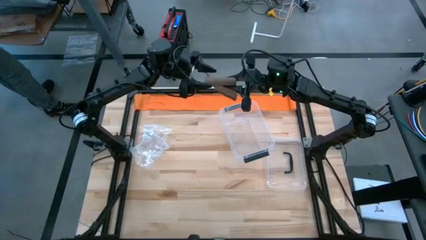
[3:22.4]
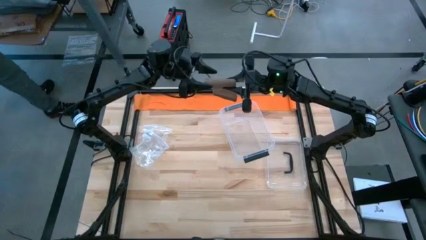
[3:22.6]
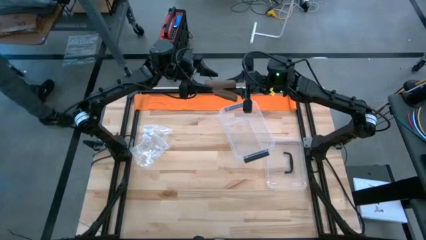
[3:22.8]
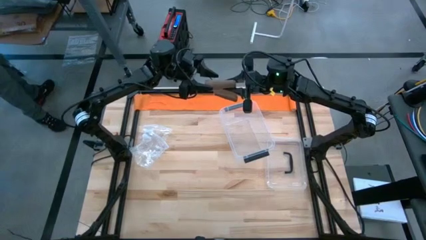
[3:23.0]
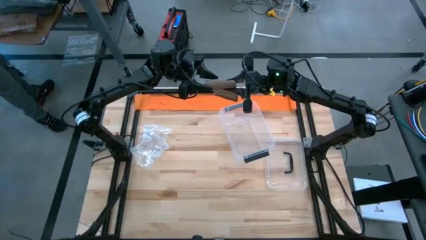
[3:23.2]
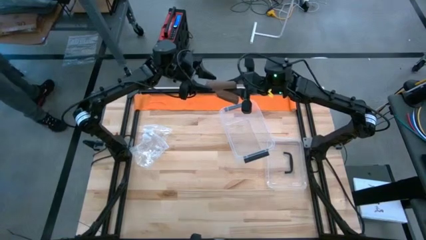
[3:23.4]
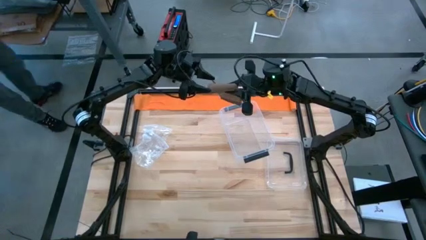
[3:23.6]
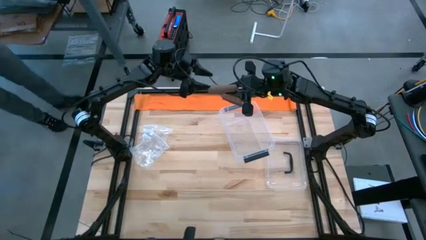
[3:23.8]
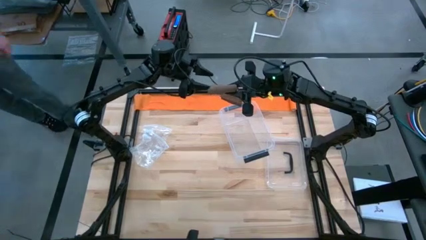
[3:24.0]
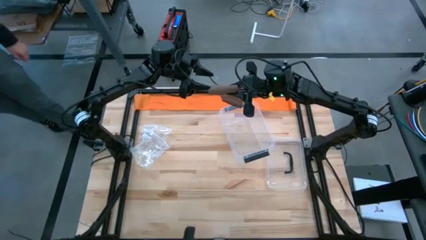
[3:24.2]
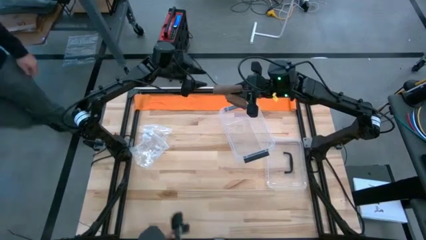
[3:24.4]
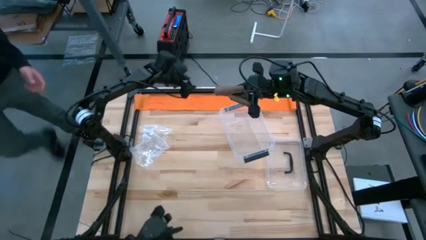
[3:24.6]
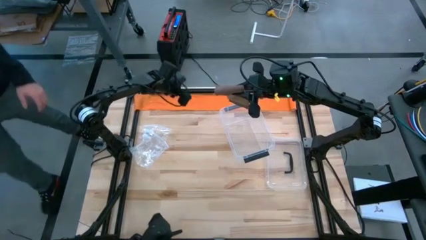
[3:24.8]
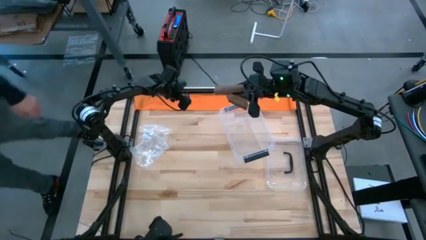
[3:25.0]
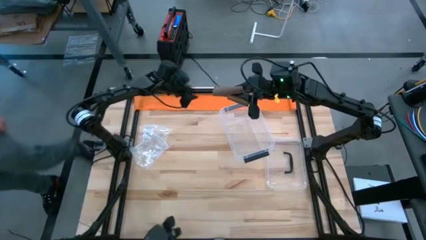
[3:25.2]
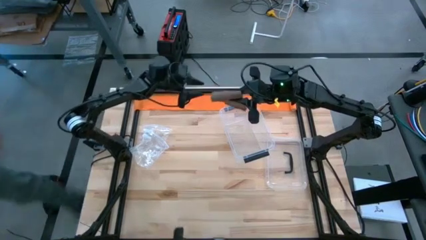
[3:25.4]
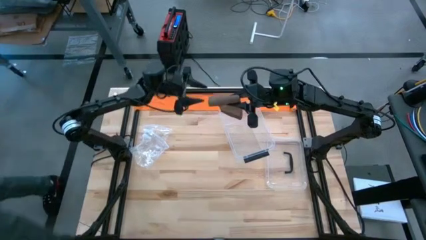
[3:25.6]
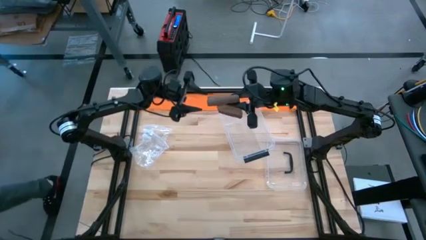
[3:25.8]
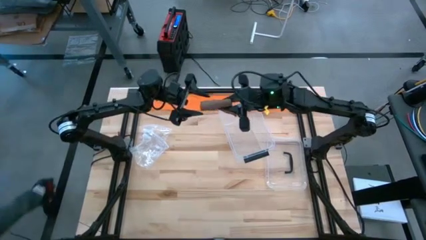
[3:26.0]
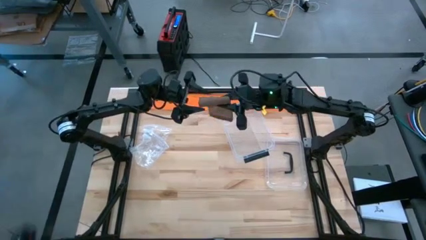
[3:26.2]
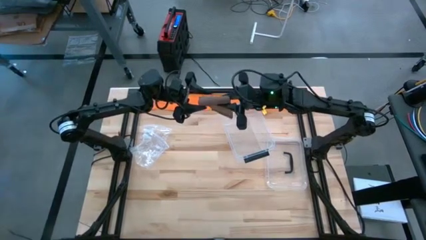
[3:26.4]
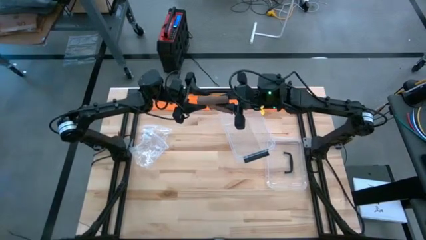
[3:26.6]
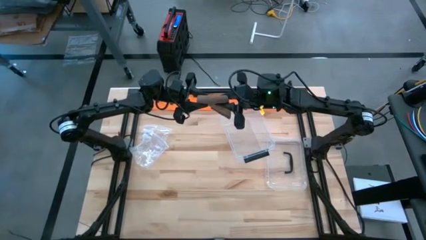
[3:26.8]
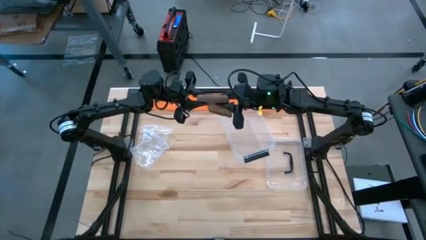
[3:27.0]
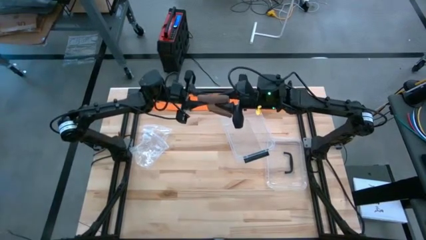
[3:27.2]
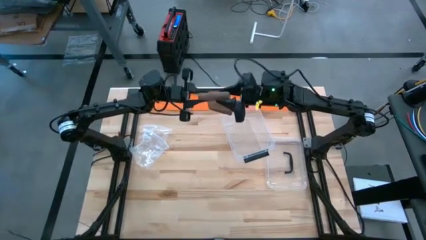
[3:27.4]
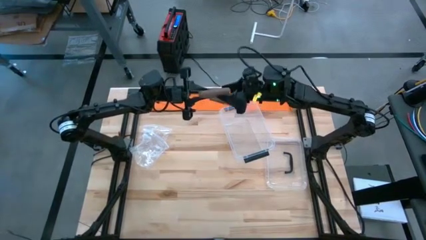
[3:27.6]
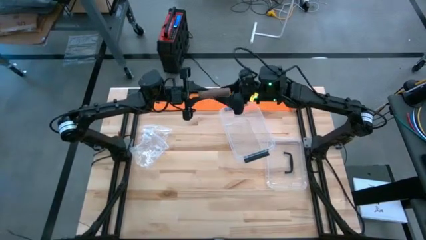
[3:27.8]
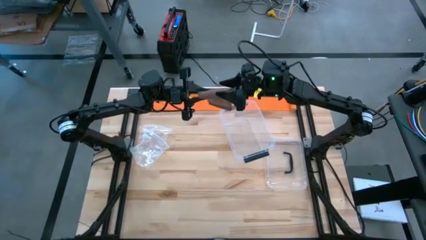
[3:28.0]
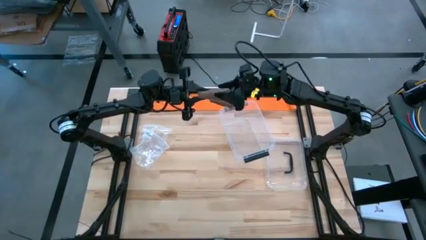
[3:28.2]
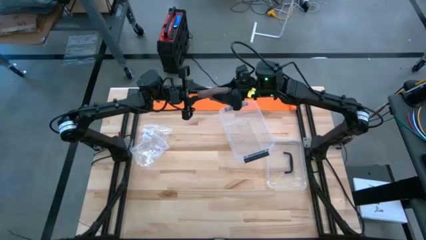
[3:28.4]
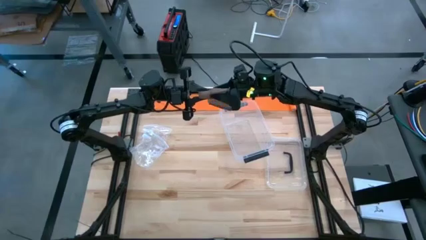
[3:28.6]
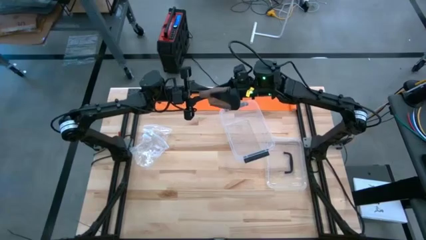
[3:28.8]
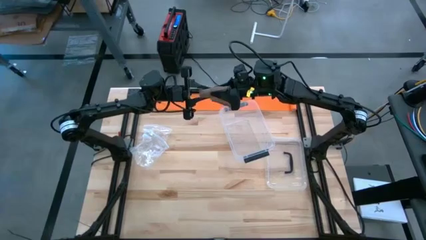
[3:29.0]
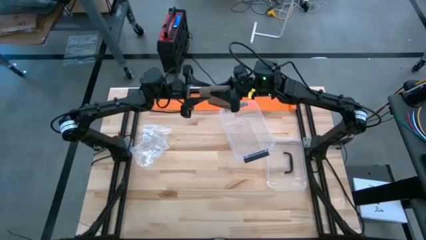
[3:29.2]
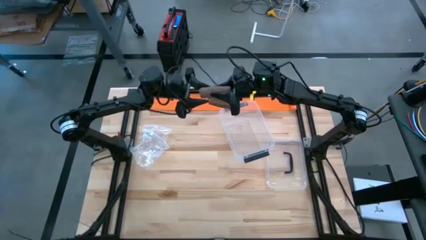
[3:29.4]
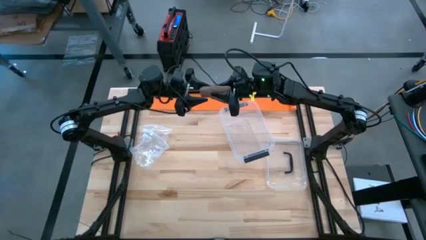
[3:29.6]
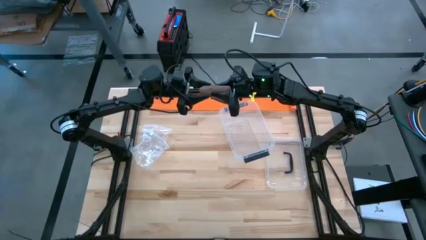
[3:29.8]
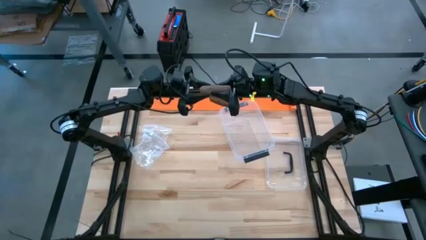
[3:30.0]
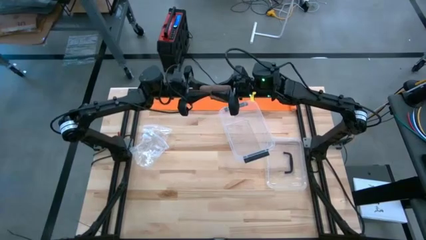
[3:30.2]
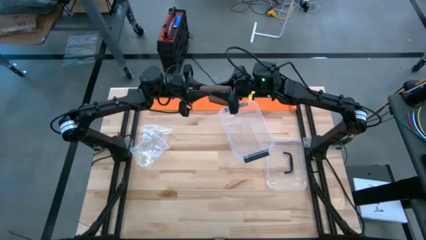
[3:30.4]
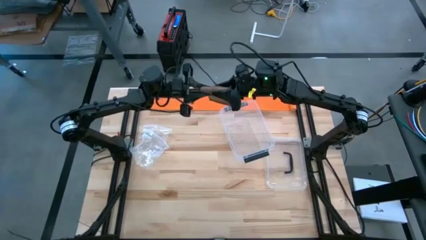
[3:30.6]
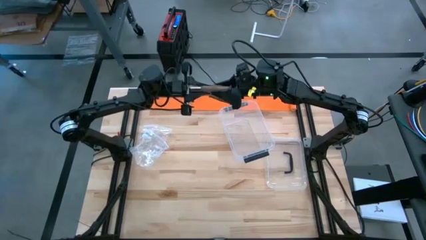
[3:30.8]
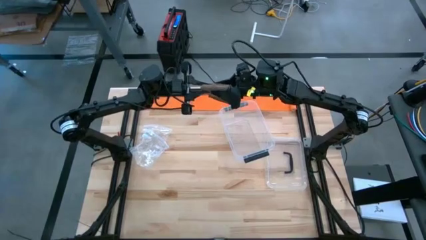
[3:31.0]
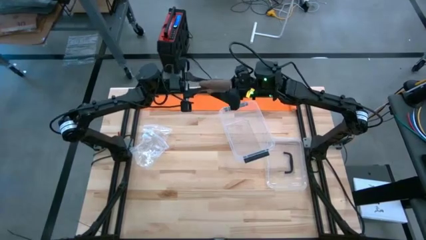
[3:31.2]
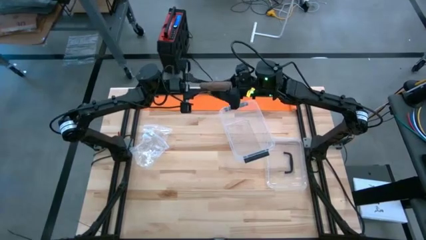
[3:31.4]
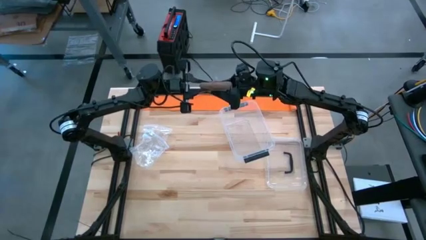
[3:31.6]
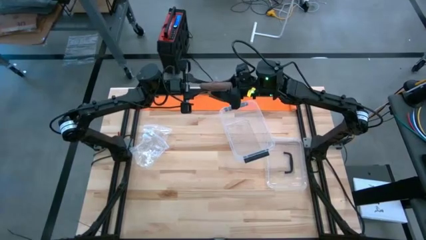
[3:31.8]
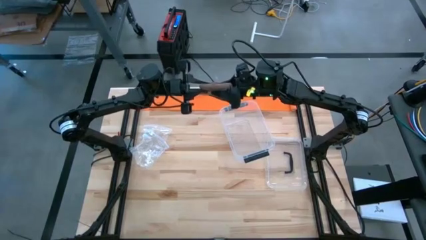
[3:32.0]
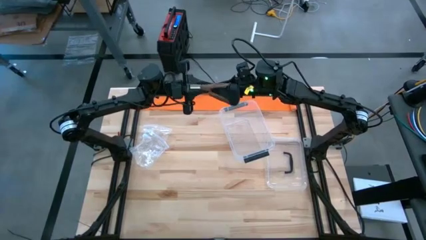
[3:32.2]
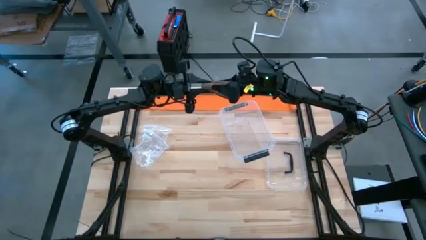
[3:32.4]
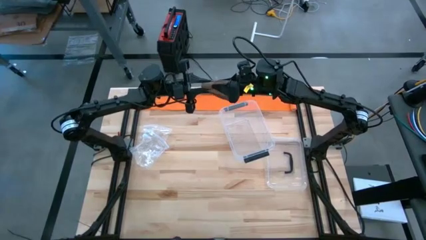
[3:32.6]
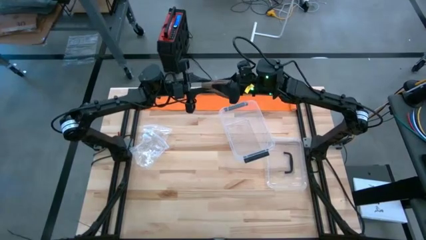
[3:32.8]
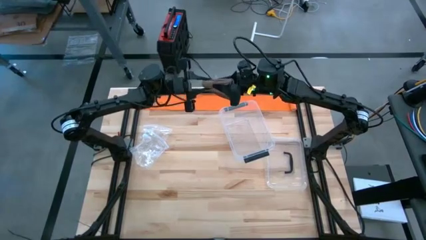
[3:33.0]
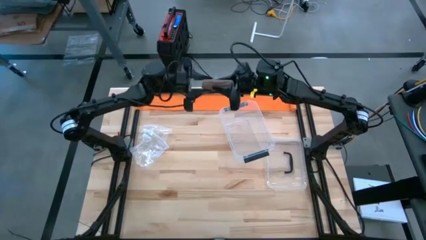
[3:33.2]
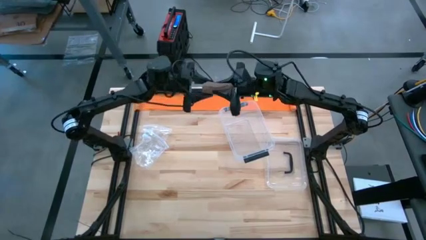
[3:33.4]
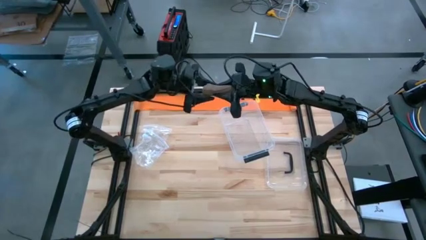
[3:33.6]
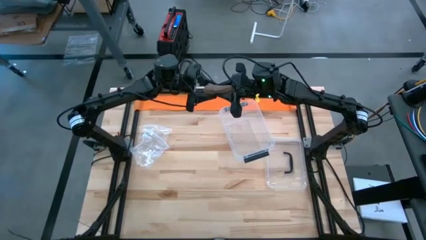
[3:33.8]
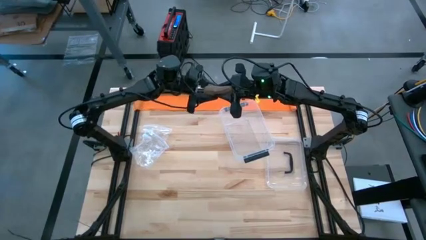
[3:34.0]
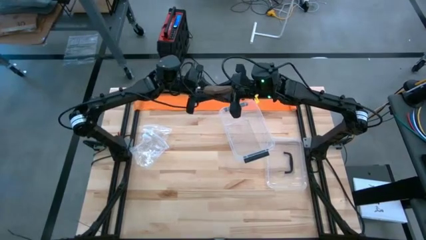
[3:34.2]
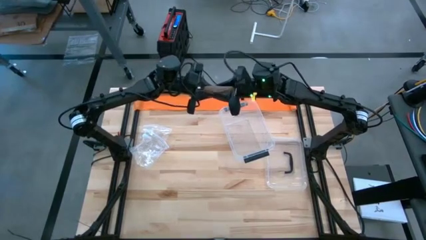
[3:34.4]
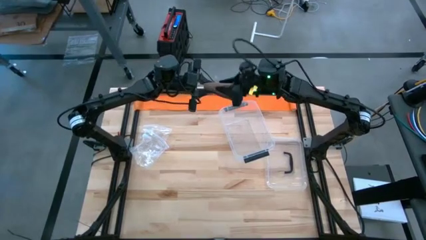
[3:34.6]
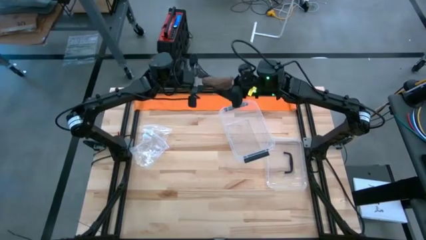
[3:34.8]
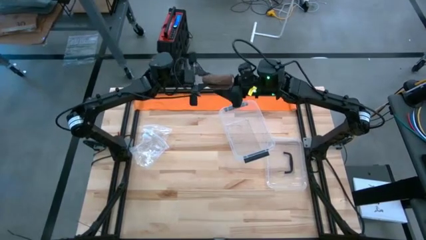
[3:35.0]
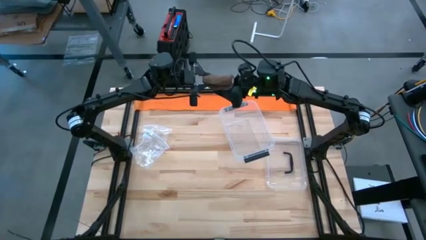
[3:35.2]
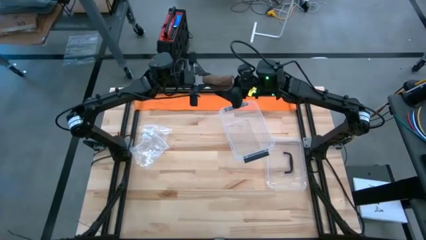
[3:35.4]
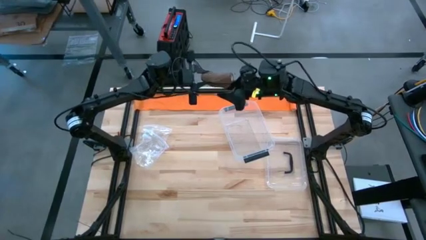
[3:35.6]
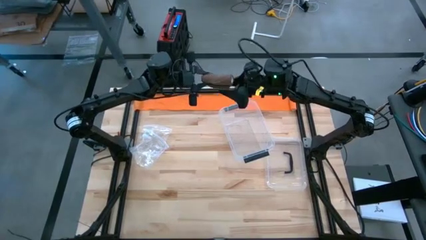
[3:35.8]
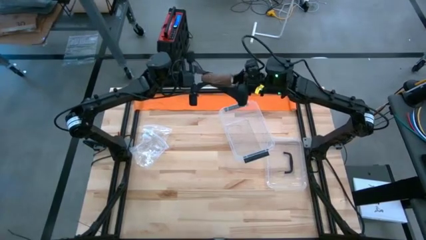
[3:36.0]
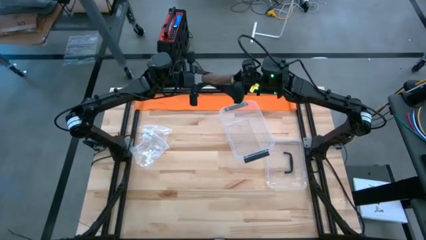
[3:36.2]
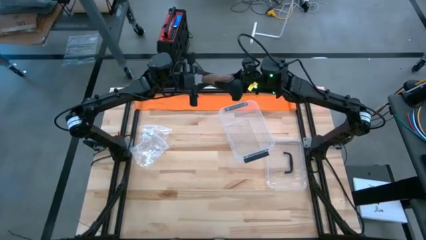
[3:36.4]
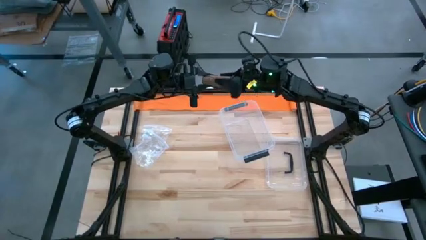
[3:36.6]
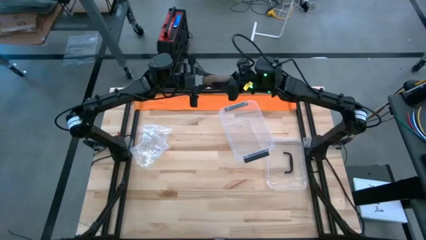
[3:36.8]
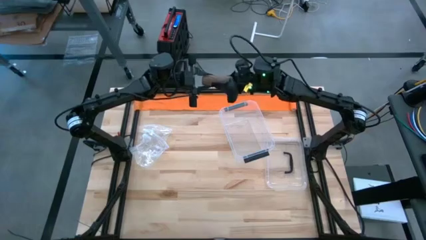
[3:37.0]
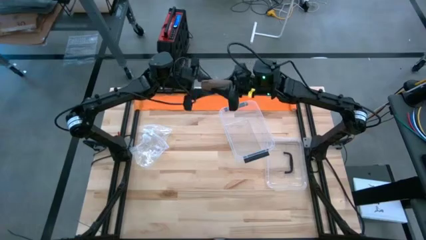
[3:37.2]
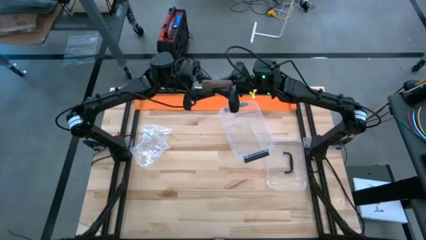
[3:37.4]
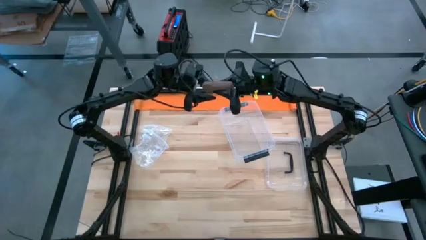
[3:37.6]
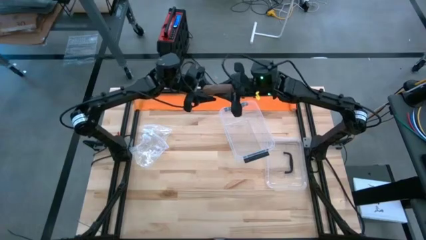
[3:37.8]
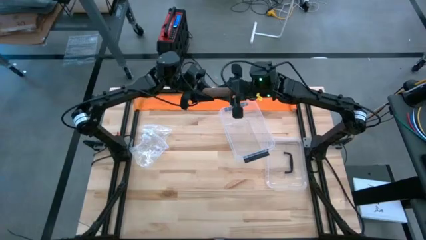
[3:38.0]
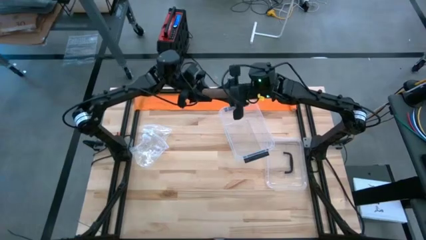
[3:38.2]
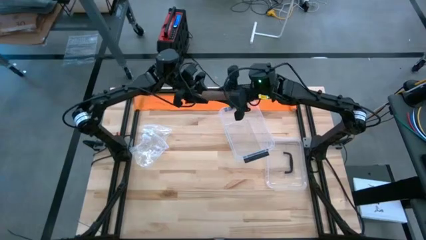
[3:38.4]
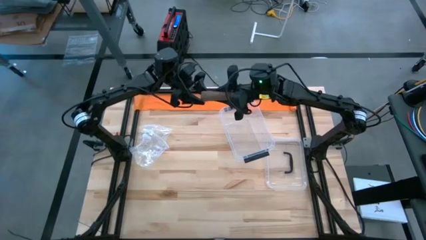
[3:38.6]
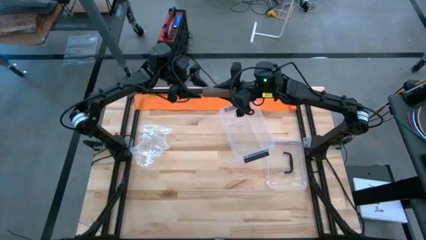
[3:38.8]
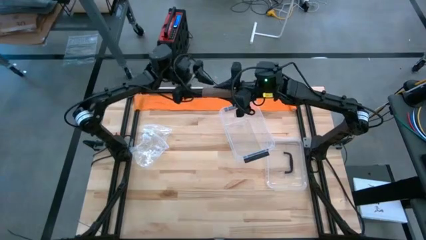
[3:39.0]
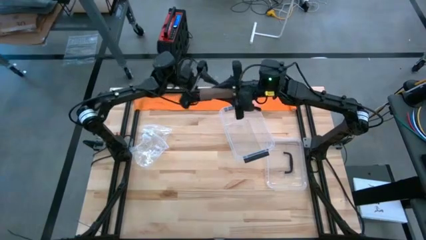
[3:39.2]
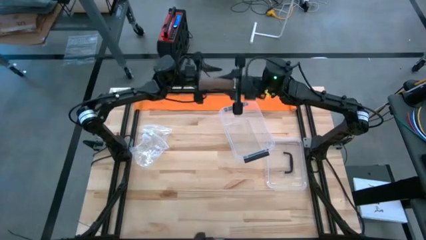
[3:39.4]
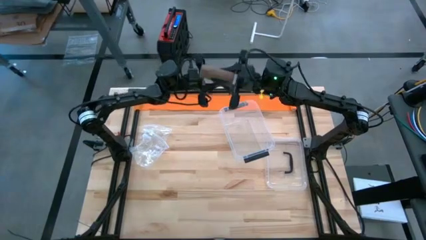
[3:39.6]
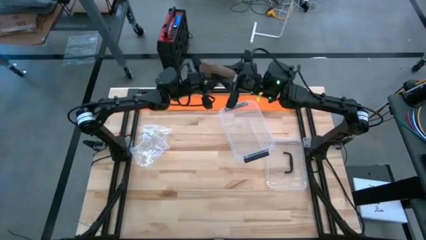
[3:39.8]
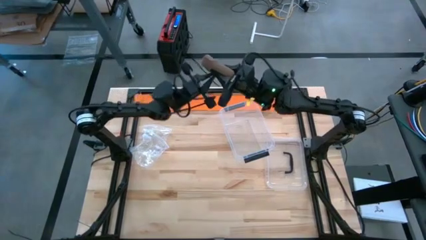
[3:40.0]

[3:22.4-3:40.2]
Task: Roll bandage
Roll the brown bandage
